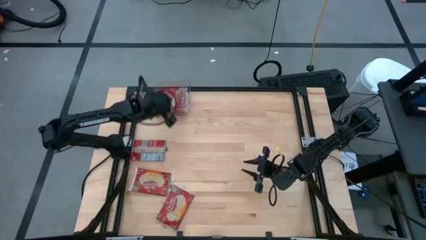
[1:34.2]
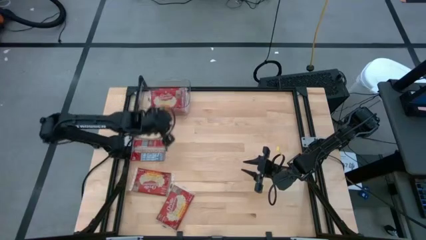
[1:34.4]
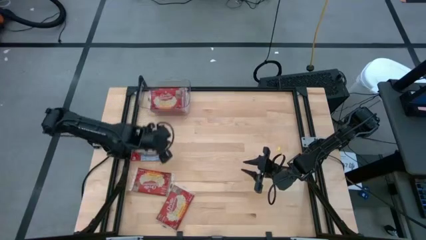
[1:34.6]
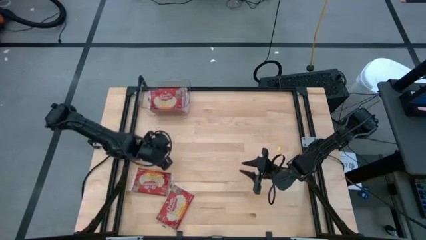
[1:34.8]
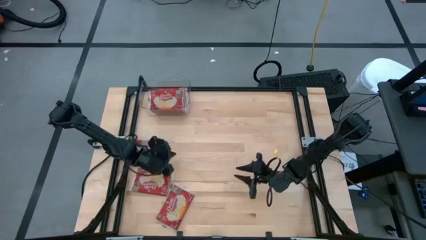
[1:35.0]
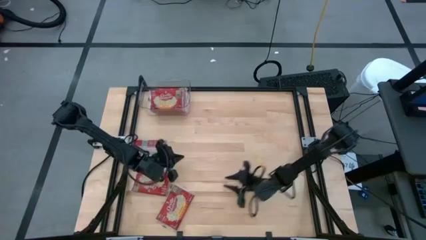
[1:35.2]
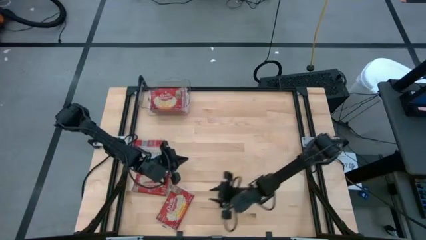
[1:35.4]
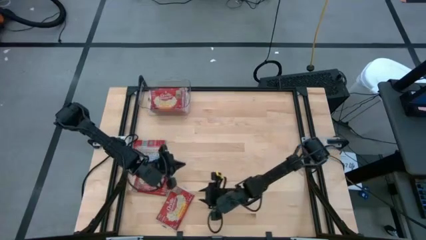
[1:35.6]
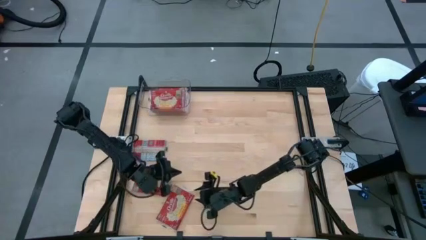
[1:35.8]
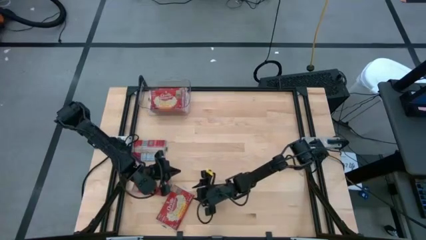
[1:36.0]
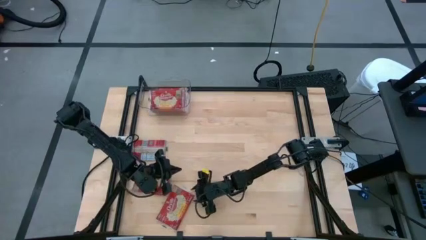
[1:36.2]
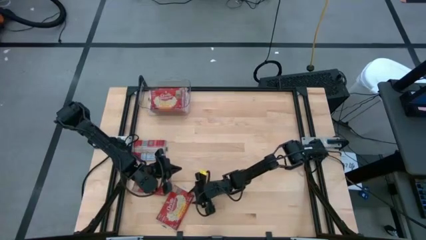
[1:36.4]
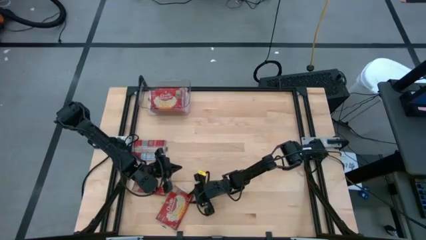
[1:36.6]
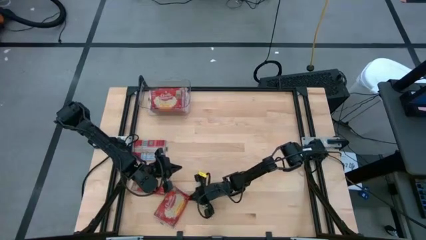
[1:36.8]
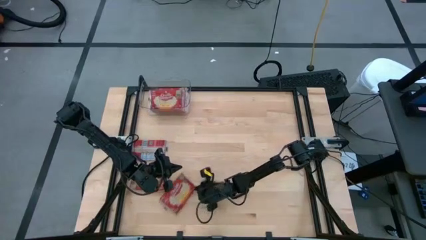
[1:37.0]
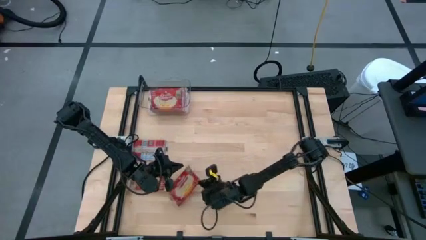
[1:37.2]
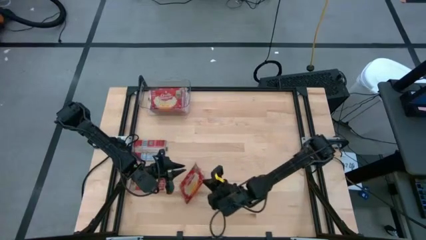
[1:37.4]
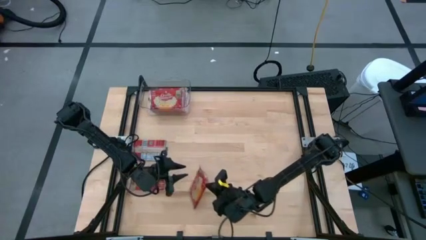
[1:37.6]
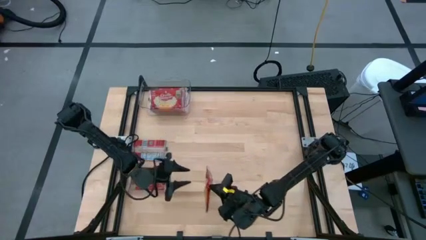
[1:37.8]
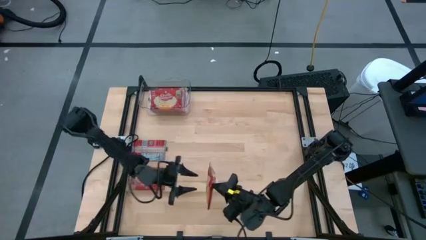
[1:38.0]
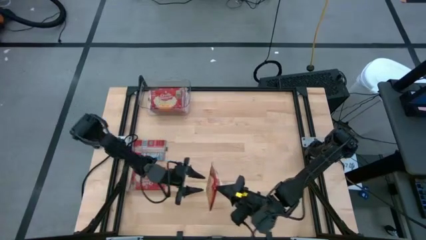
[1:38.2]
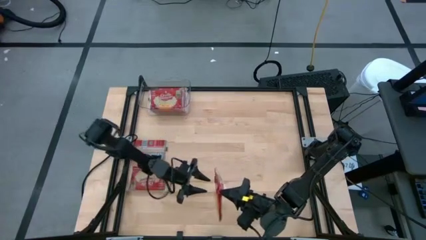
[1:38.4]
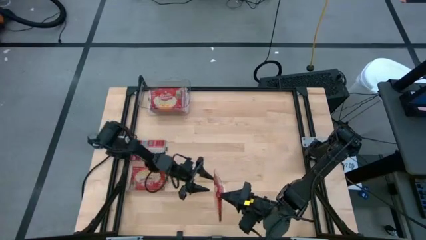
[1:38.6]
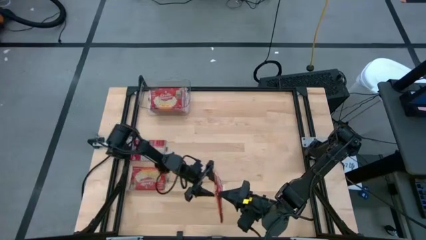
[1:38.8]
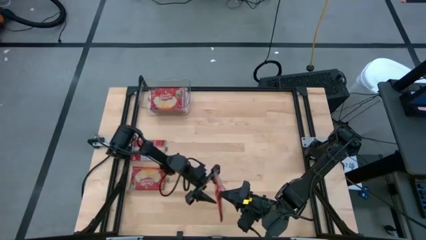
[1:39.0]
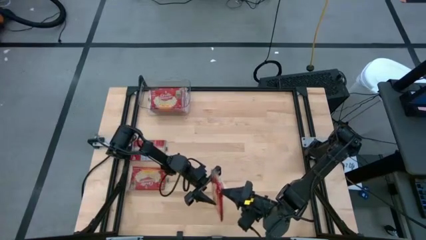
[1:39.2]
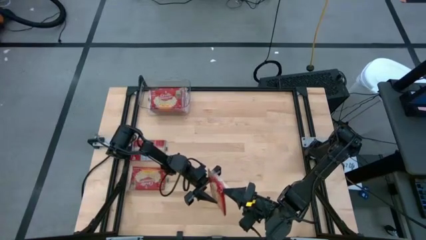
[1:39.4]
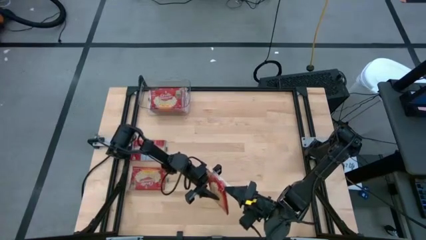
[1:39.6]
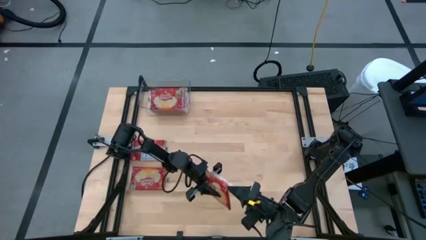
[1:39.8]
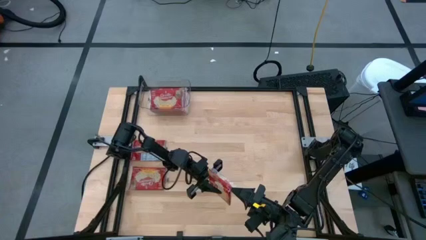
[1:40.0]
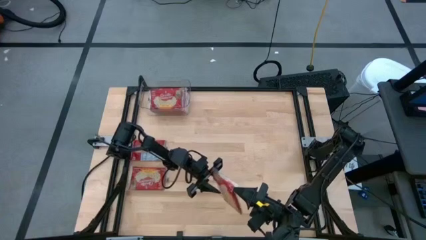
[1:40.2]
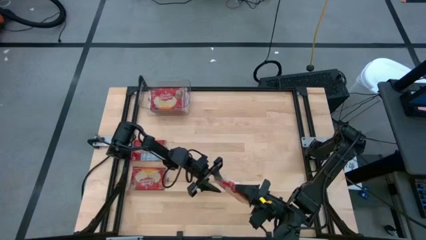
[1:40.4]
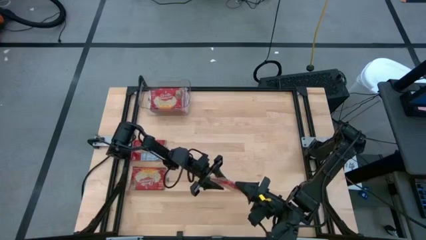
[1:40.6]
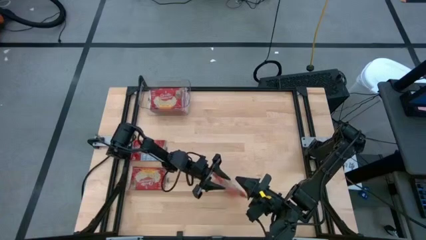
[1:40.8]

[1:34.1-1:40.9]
Task: Sort popcorn bags into baskets
Put the red popcorn bag into the transparent bin

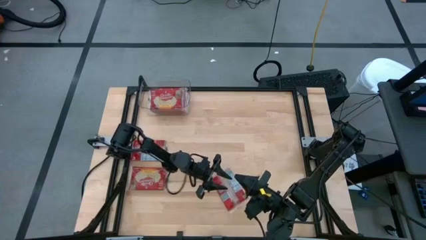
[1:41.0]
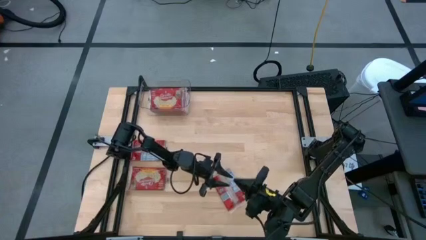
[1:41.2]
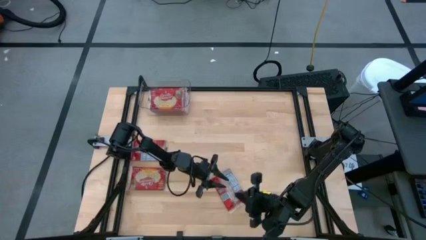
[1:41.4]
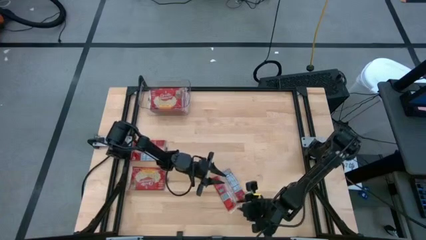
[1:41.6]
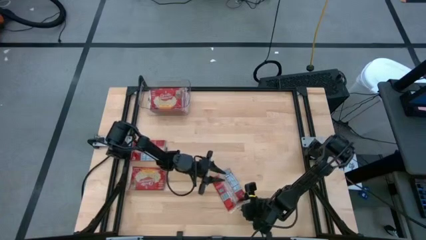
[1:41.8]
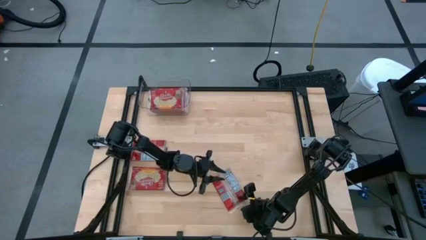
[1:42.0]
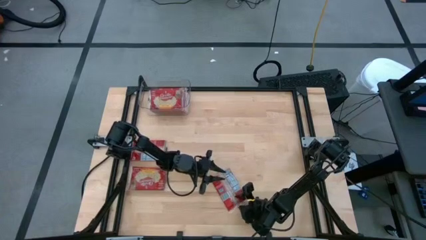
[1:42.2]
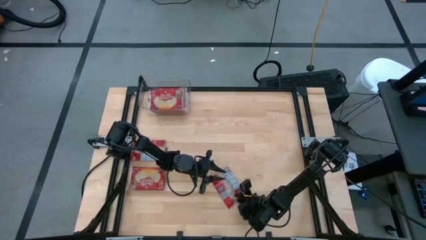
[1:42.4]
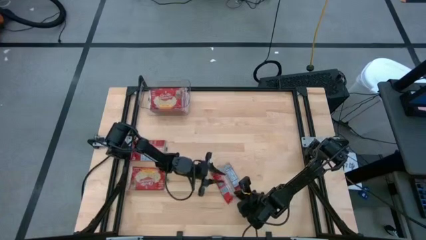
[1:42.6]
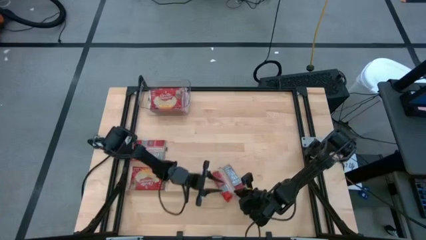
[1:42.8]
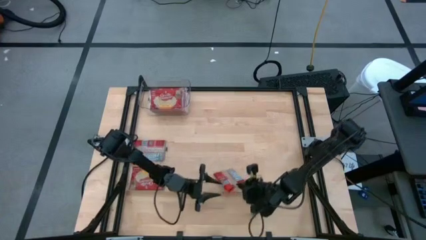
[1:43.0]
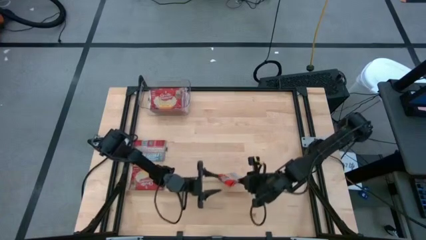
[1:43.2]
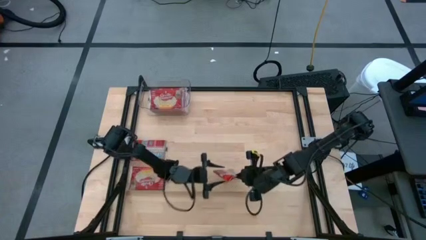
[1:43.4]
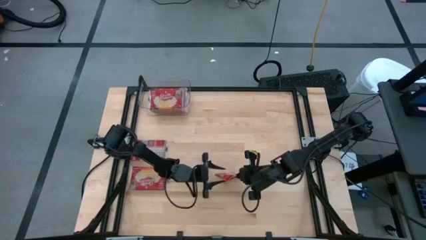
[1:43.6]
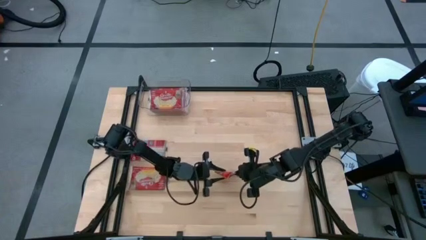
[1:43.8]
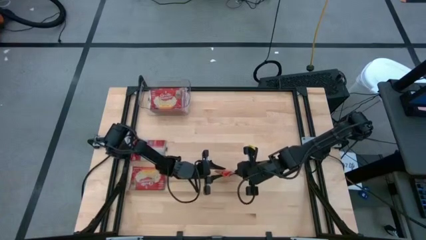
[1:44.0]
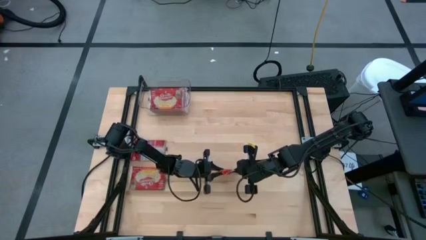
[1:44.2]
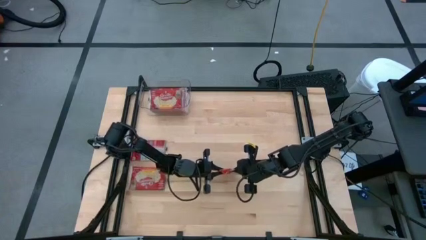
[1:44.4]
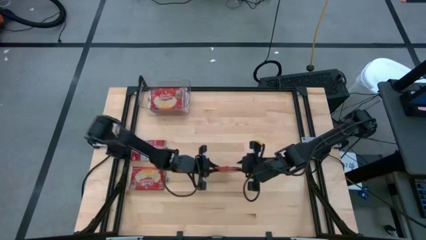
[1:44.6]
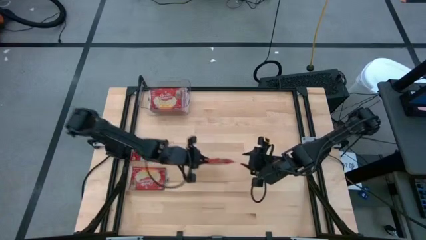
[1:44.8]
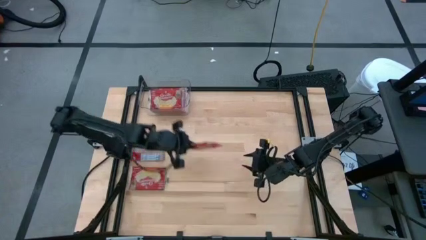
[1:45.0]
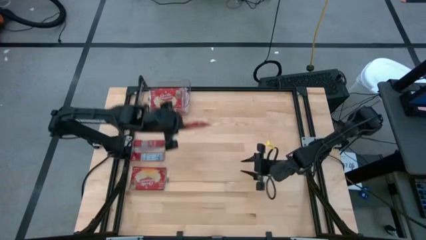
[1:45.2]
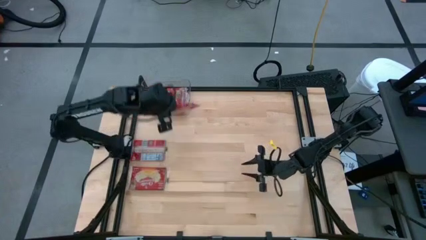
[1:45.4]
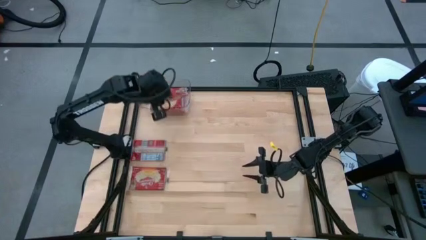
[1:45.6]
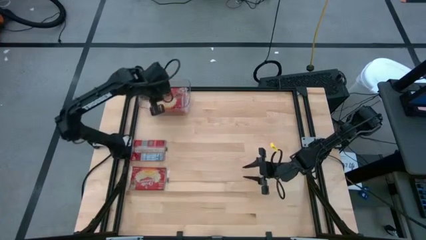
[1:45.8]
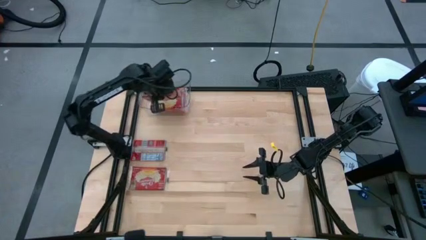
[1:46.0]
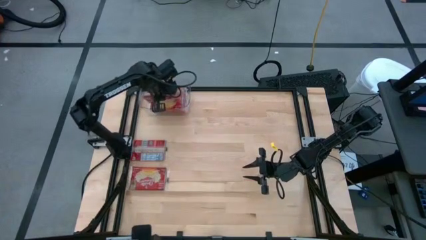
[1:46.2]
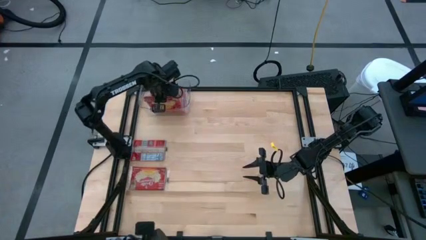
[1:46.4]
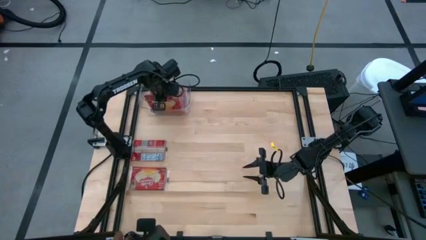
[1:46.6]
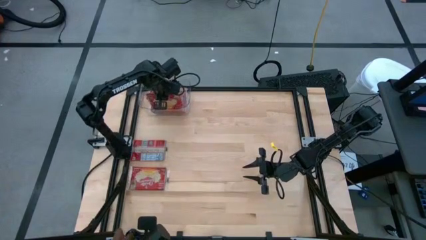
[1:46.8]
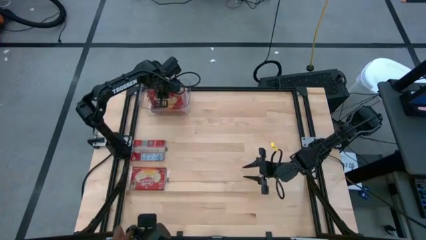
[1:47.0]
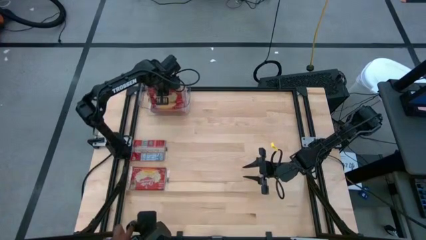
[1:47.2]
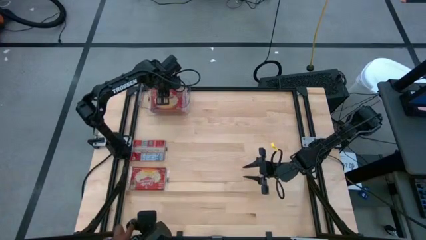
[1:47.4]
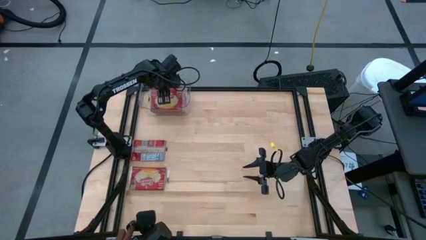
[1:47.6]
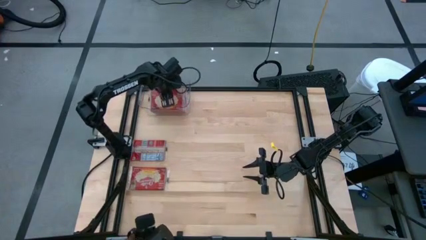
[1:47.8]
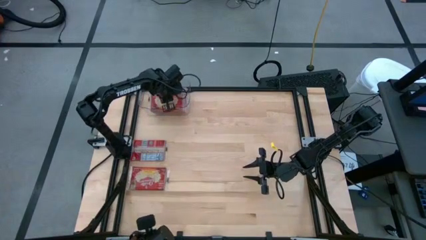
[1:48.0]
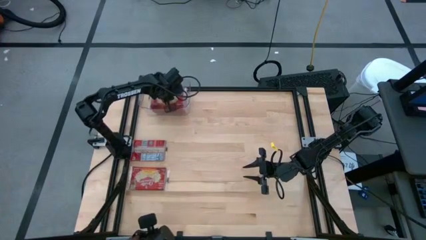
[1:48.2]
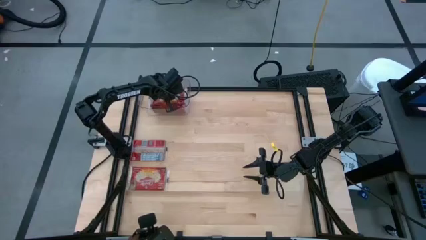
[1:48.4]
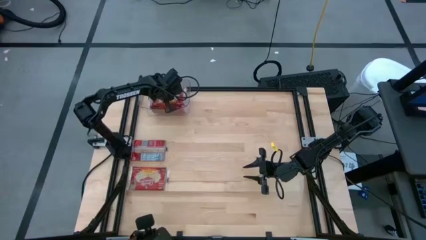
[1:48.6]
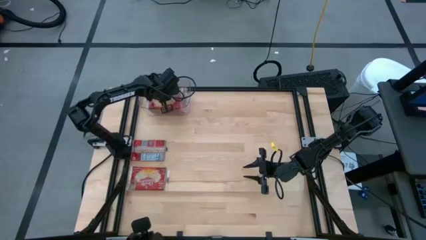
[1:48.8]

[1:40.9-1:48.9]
Put the red popcorn bag into the transparent bin
